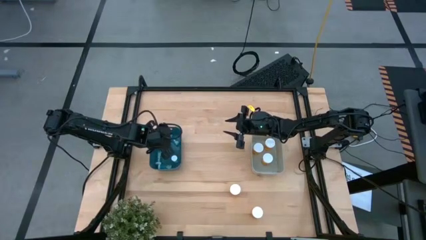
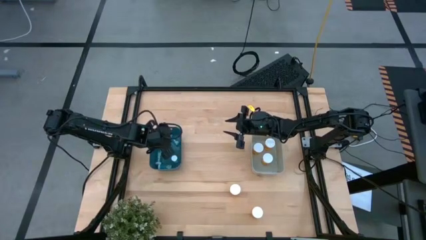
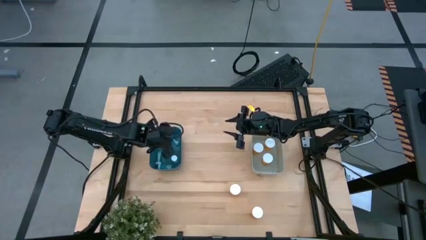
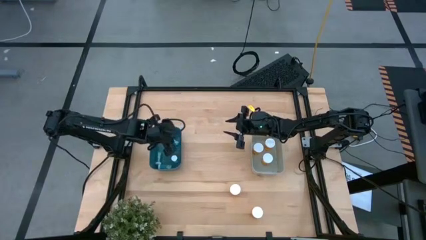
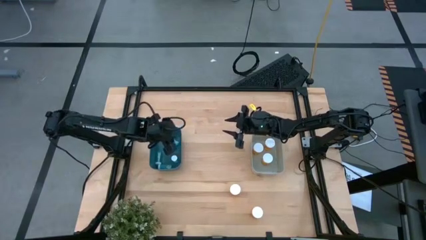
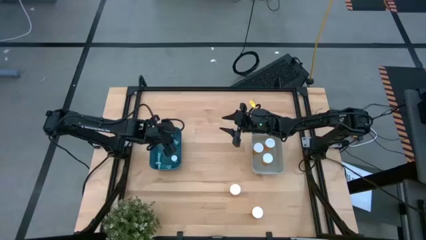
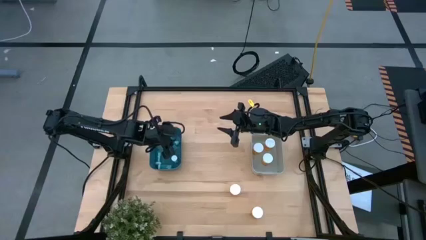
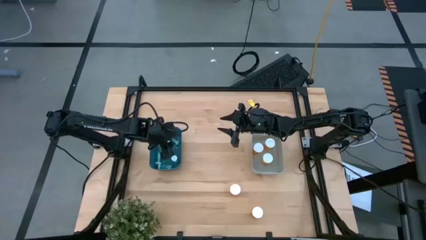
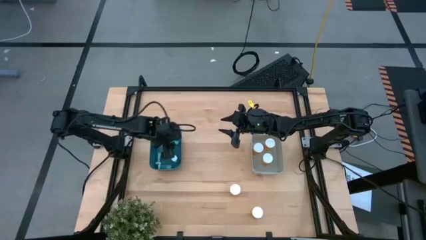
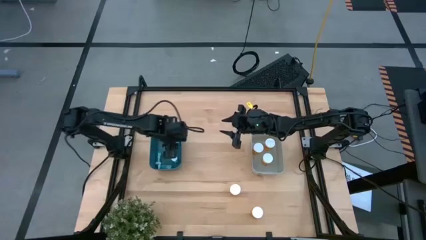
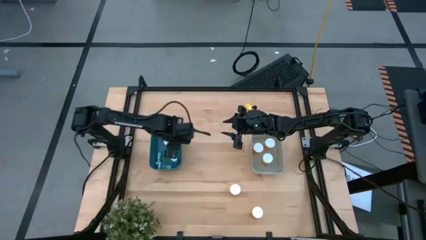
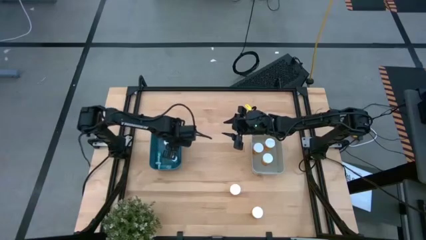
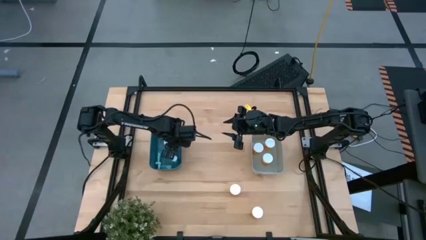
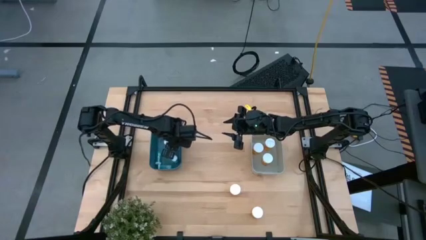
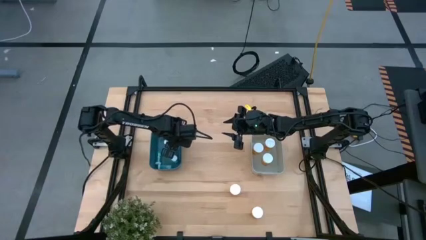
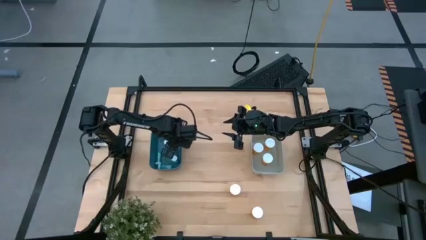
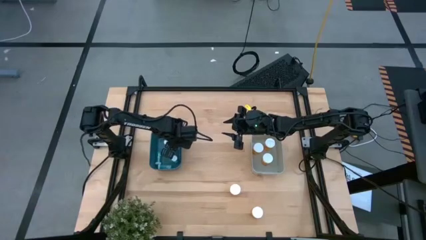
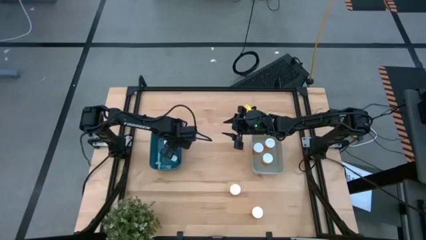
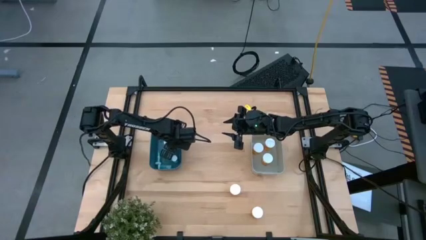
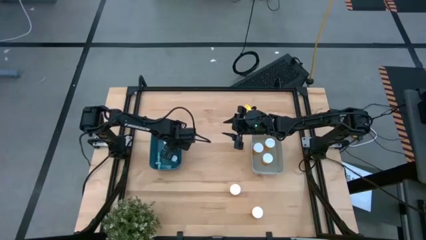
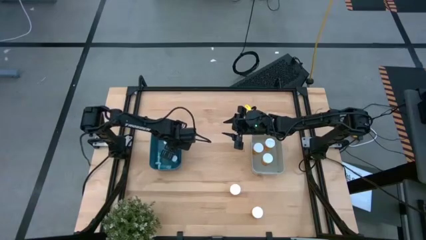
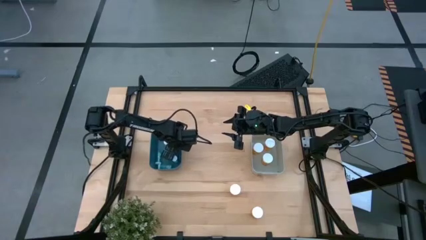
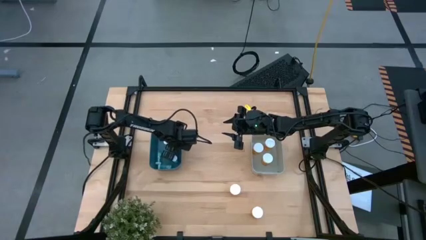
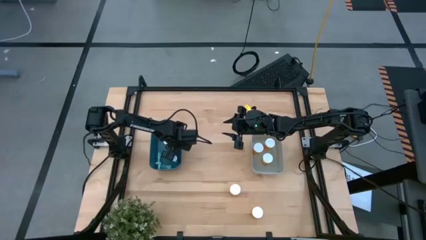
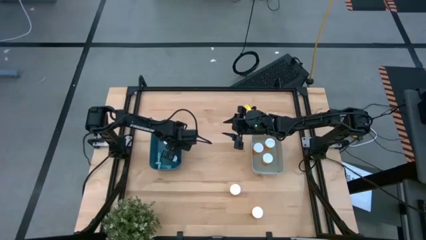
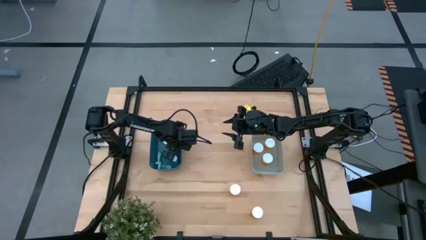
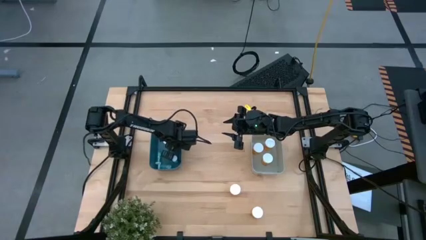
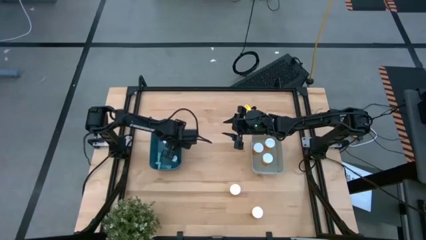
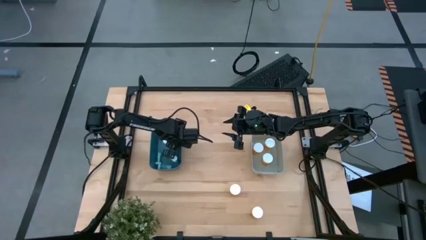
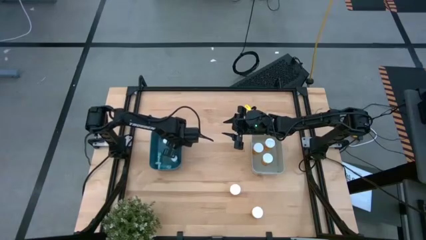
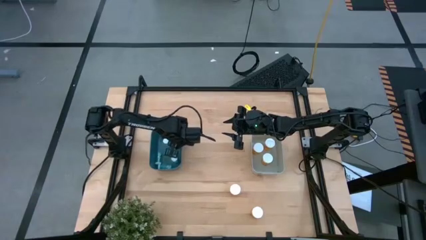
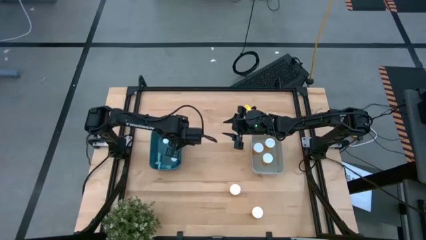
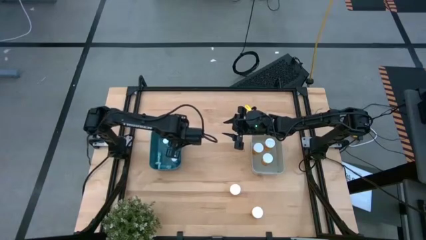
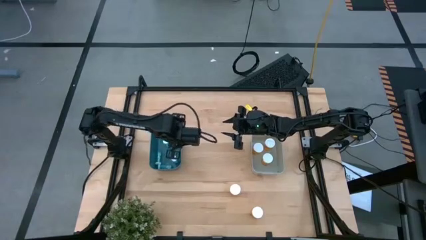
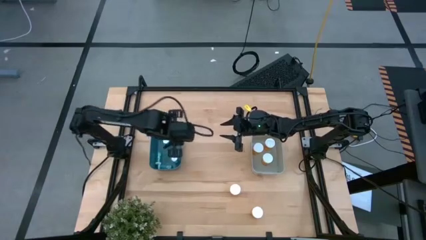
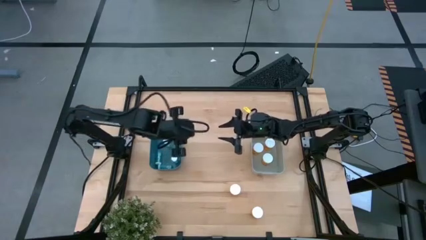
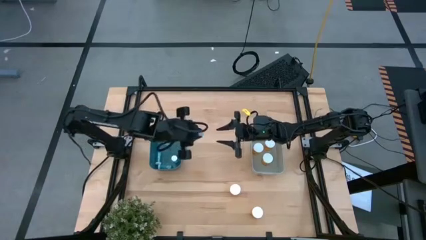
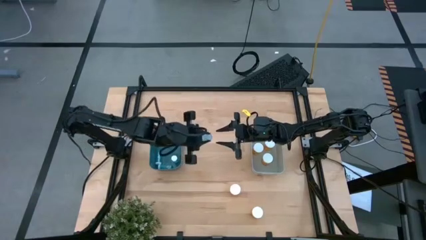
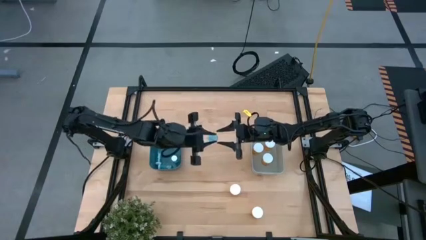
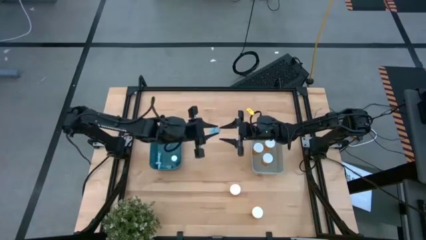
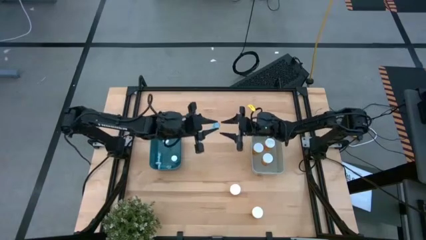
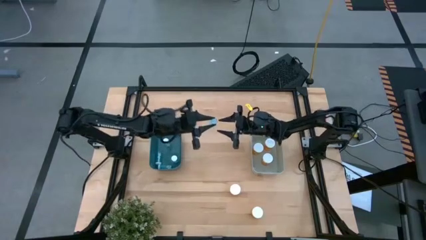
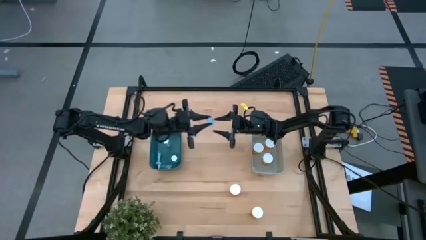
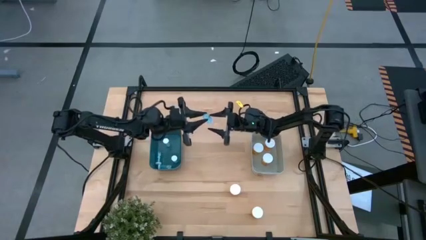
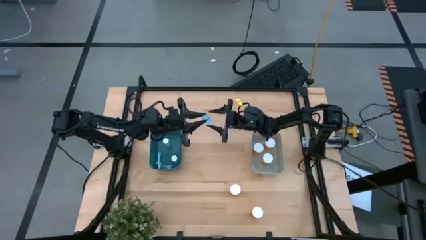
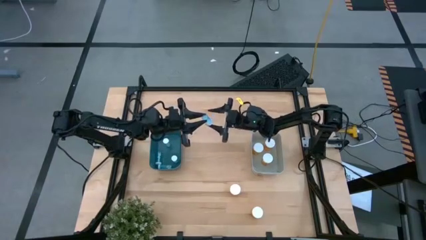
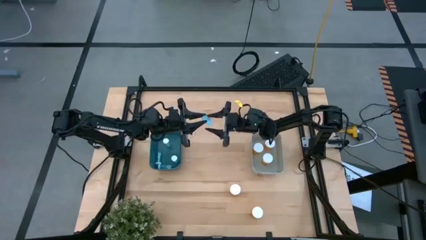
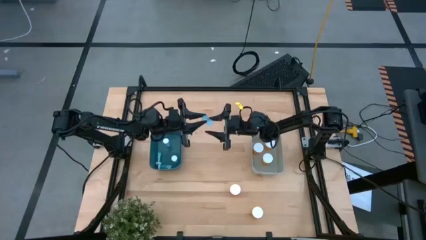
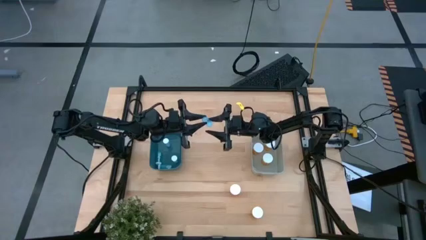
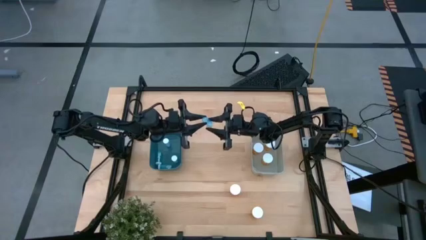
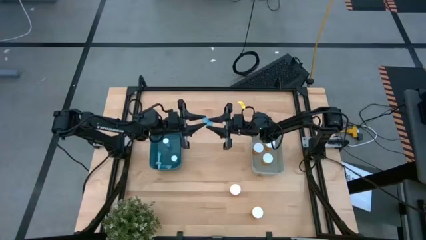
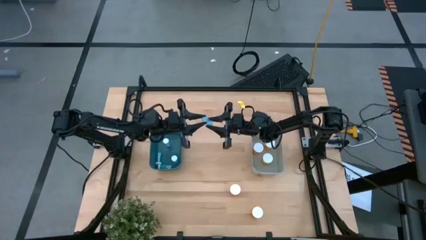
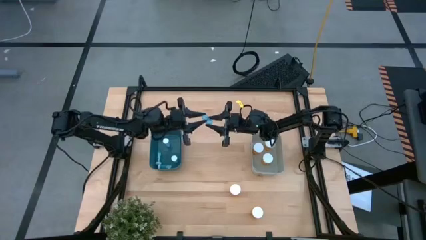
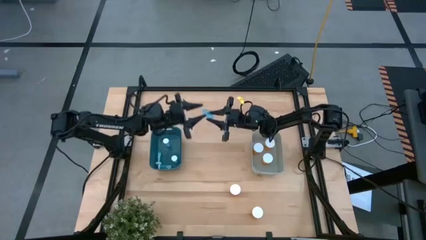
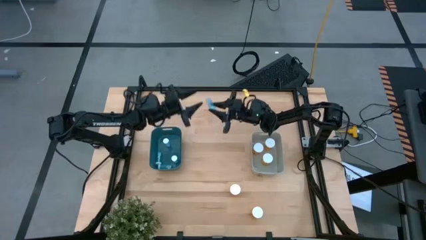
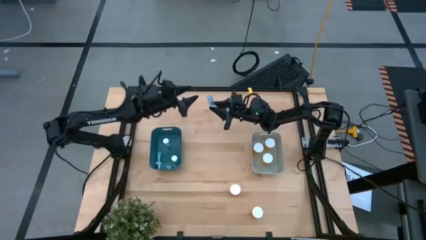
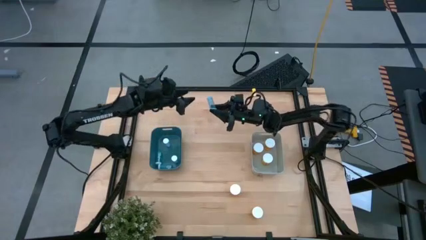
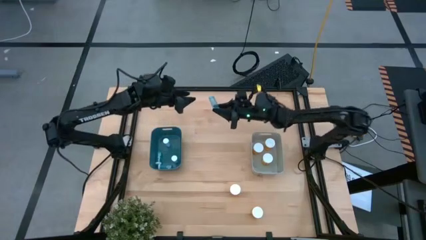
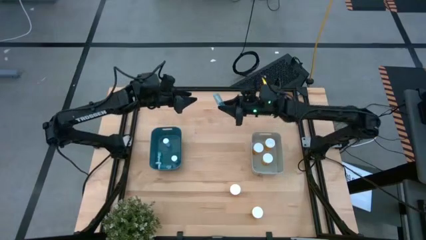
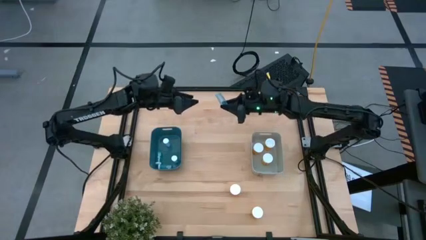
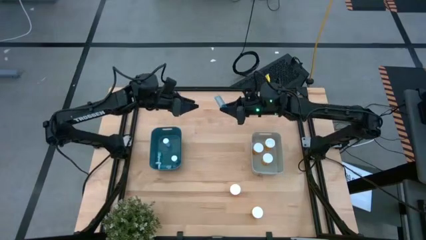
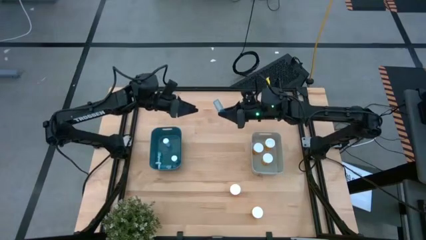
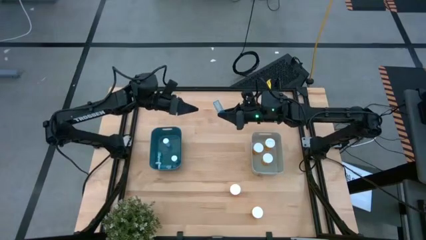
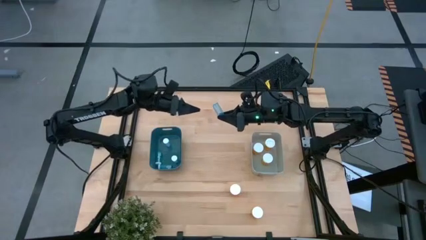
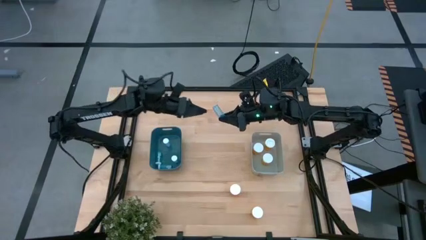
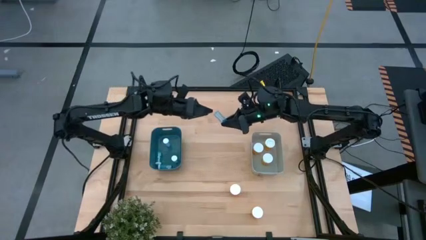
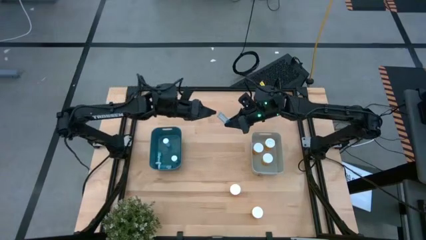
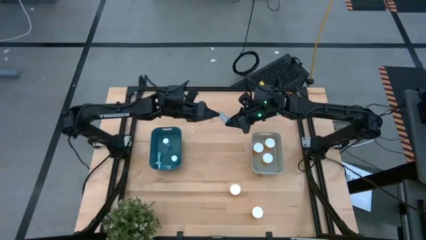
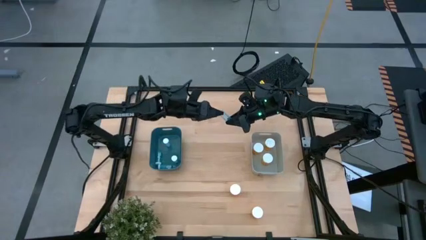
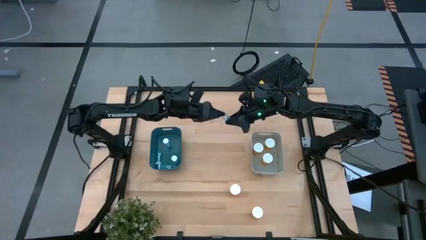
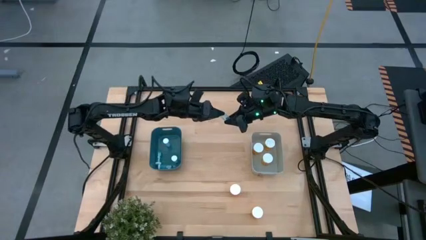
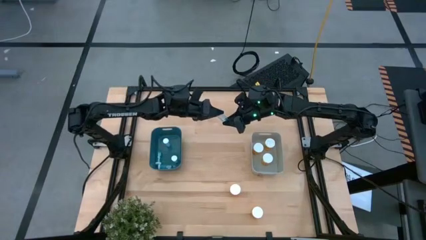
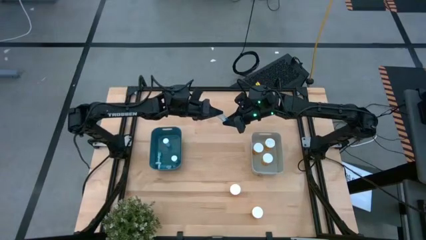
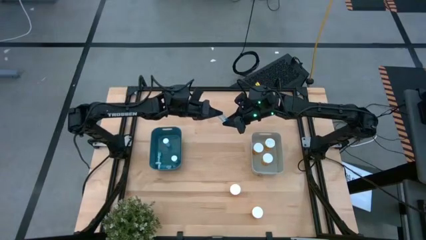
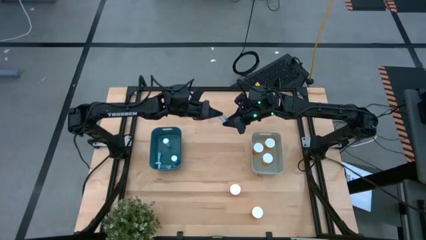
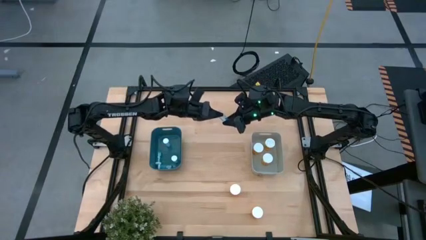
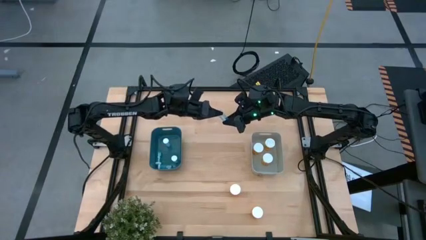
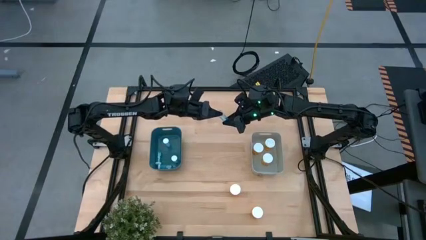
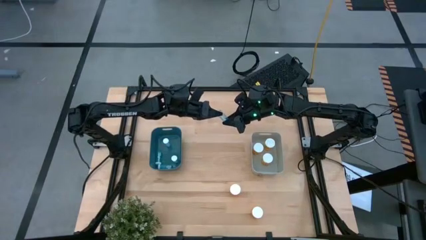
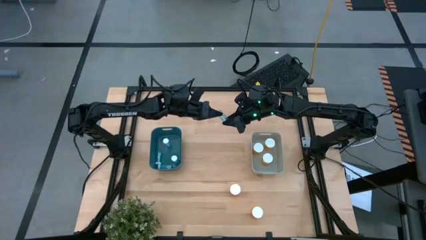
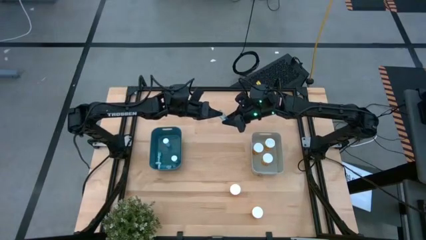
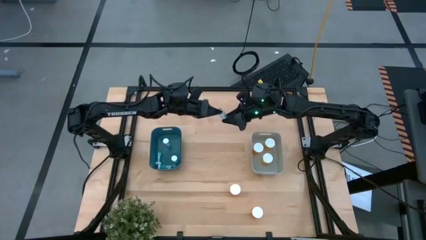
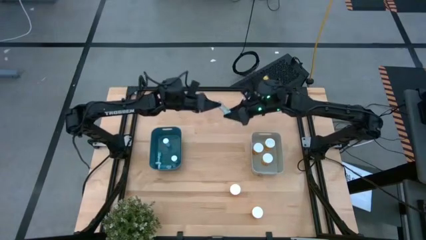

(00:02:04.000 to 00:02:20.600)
Task: Pick and place medicine bottles into bin by pill shape (circle, oval)
Adjust the blue pill bottle
